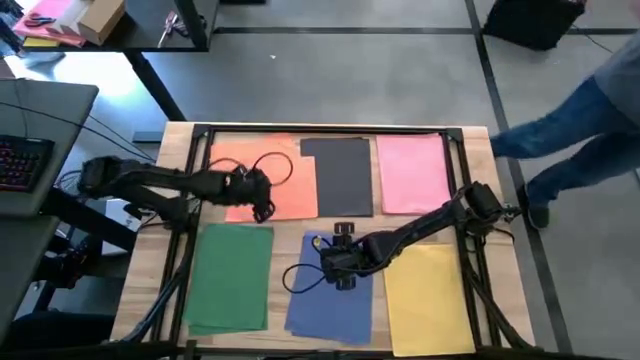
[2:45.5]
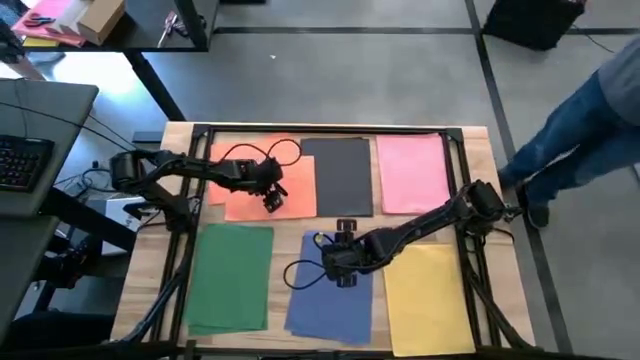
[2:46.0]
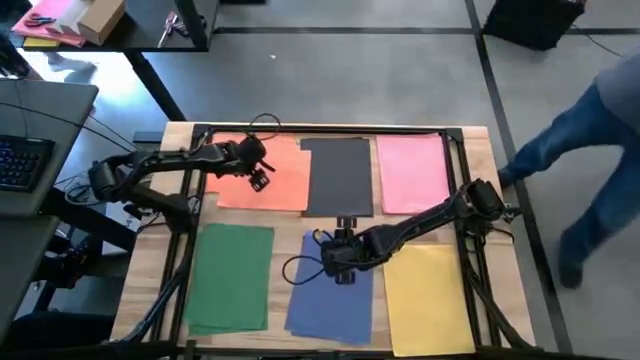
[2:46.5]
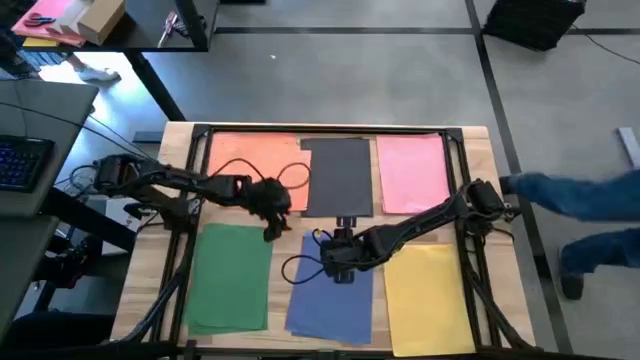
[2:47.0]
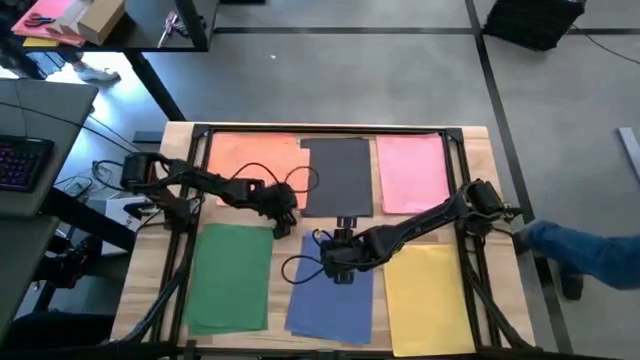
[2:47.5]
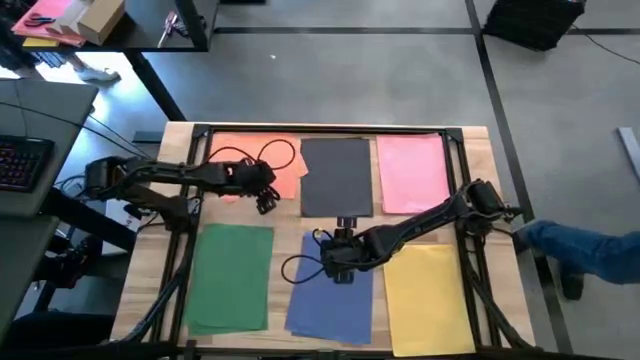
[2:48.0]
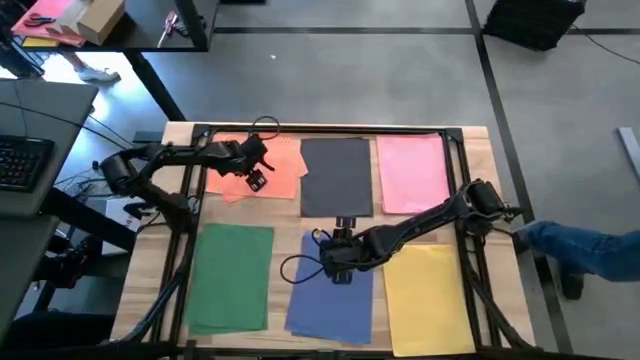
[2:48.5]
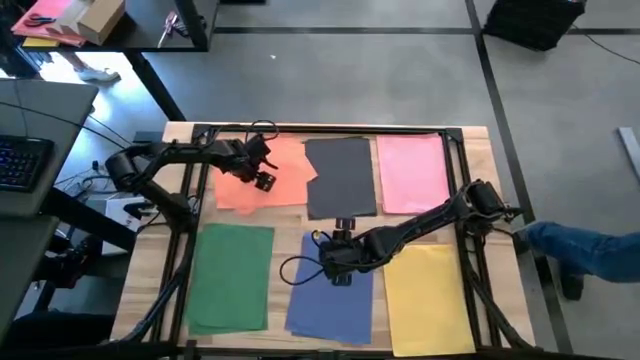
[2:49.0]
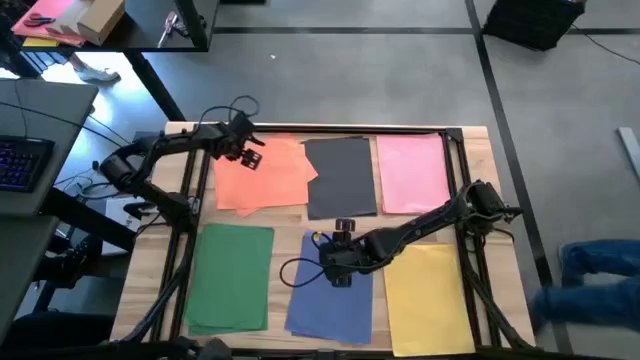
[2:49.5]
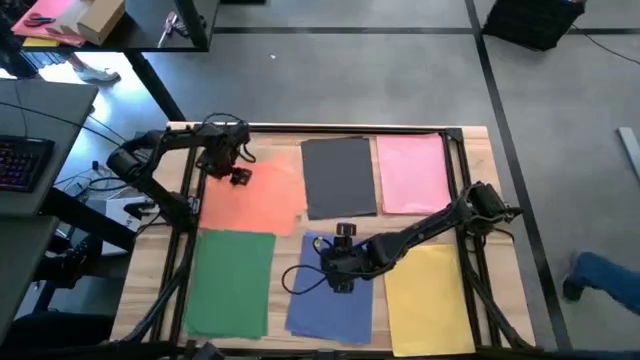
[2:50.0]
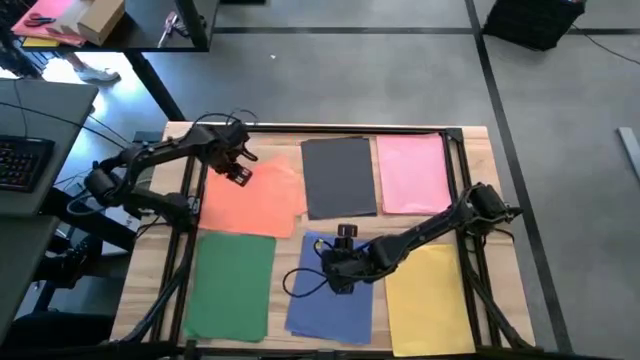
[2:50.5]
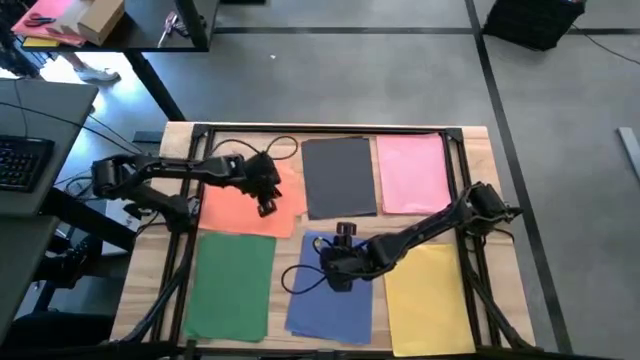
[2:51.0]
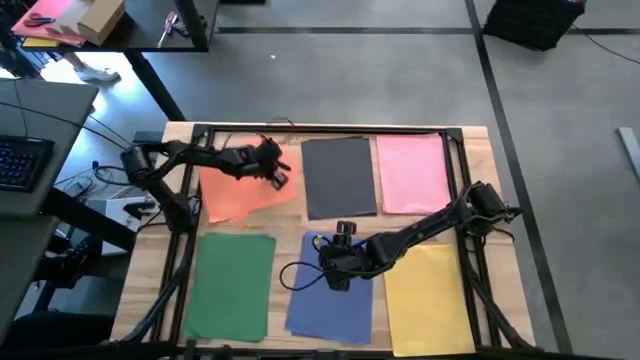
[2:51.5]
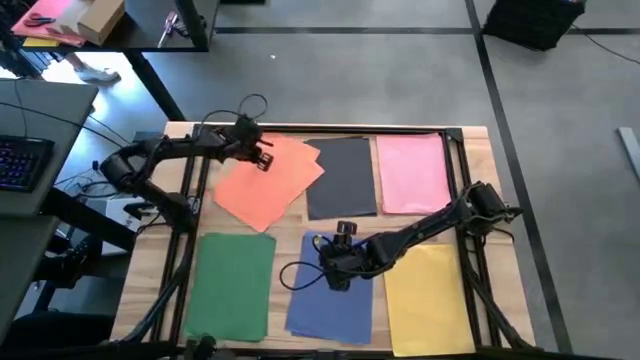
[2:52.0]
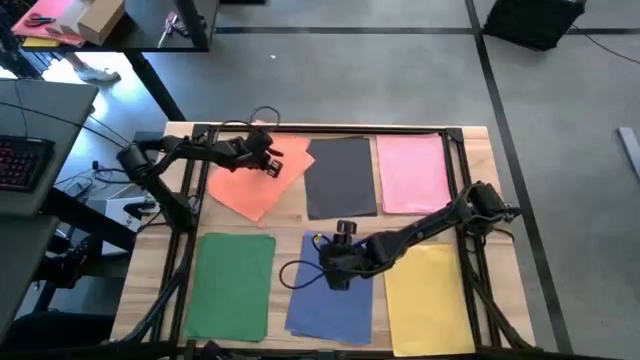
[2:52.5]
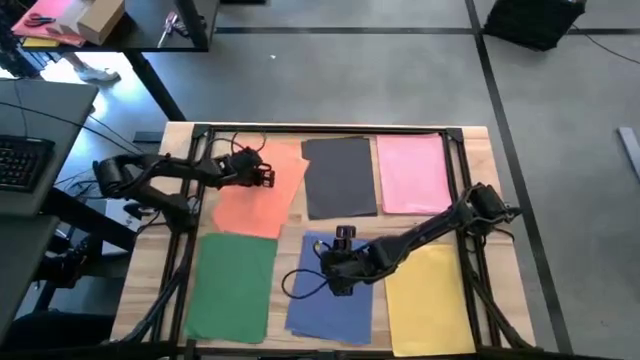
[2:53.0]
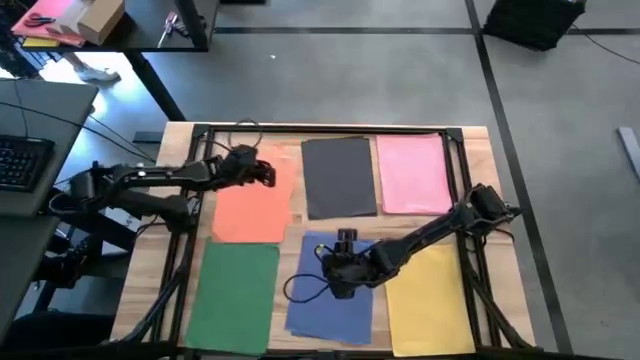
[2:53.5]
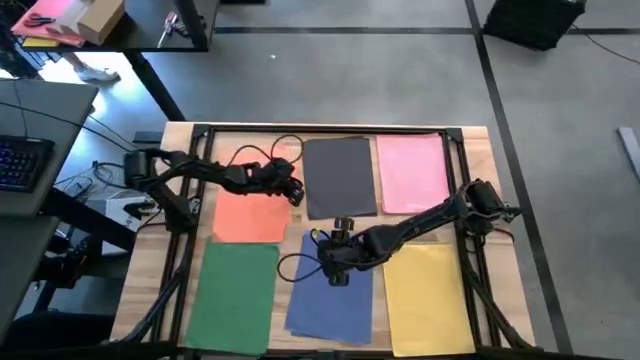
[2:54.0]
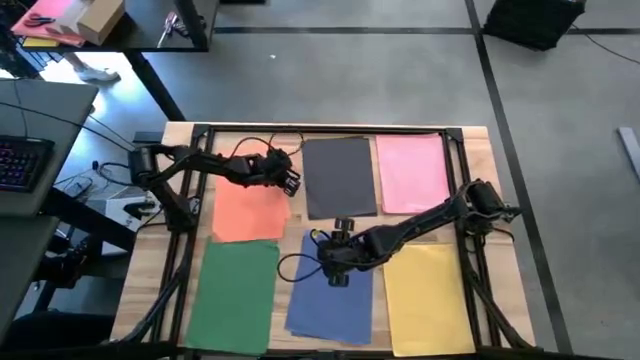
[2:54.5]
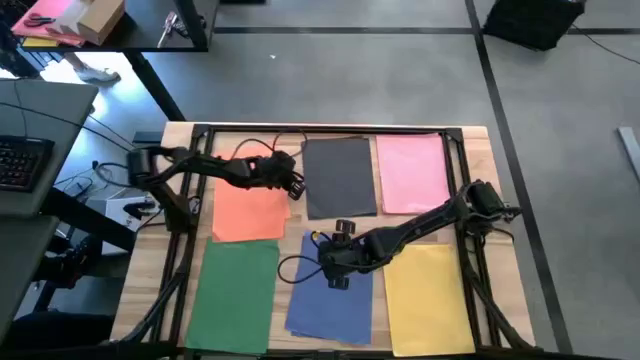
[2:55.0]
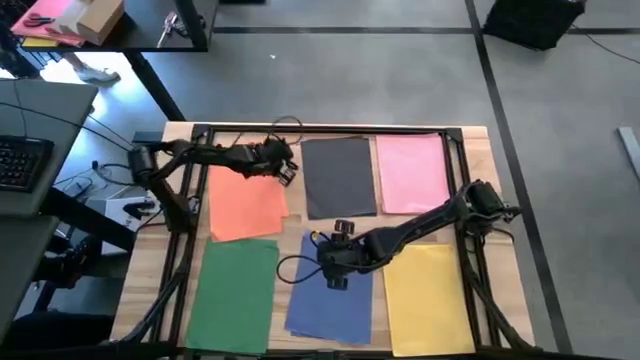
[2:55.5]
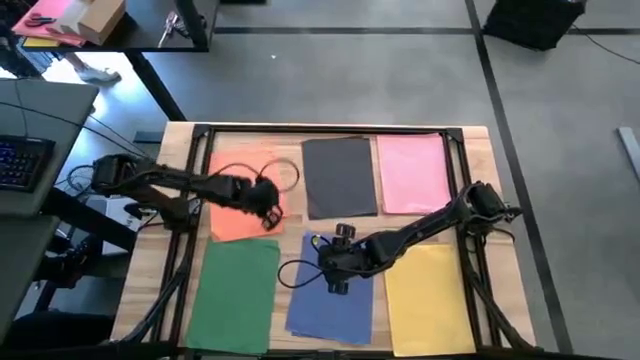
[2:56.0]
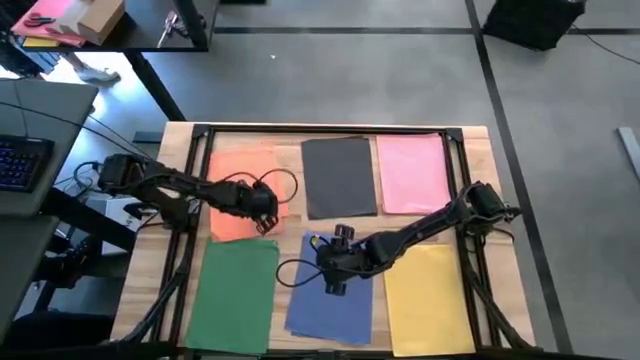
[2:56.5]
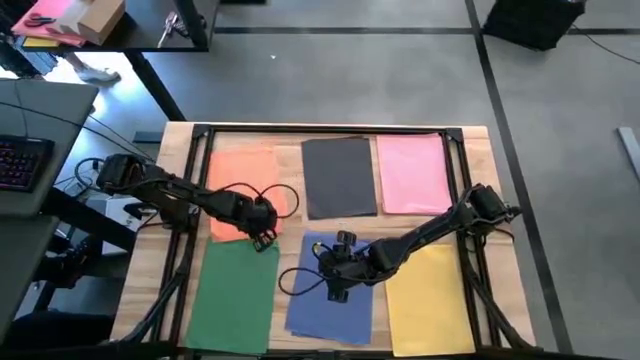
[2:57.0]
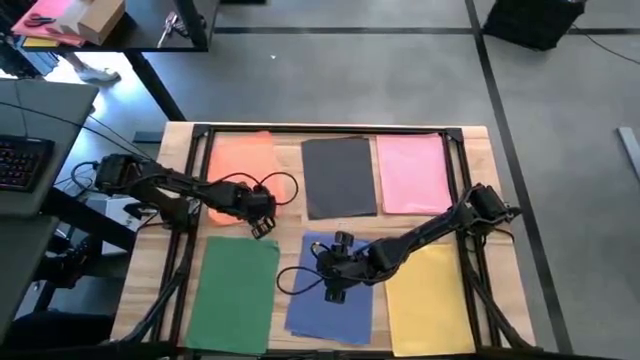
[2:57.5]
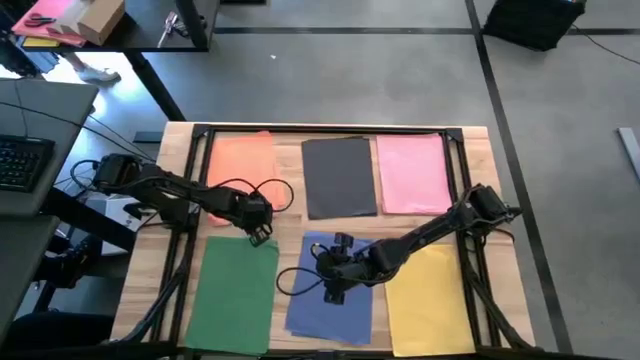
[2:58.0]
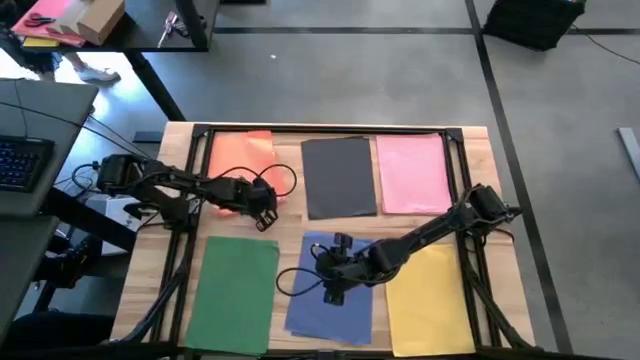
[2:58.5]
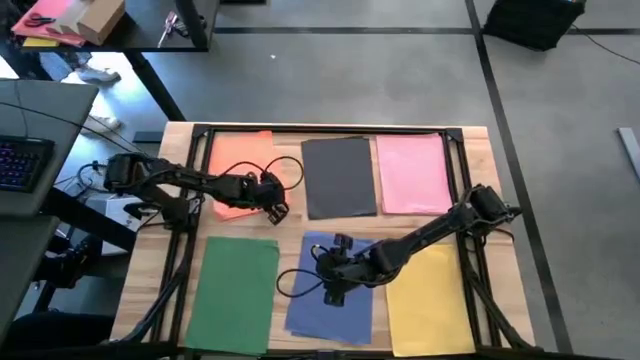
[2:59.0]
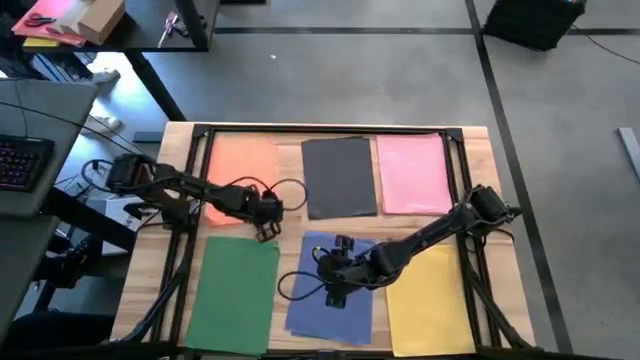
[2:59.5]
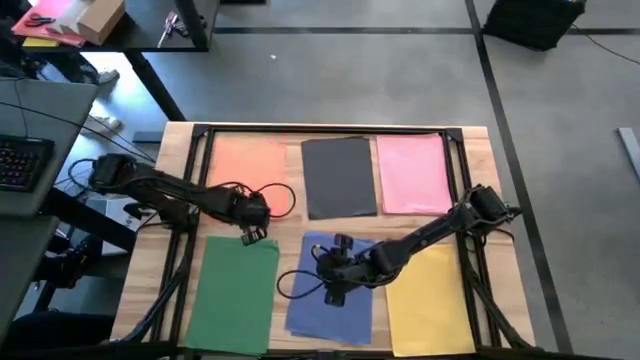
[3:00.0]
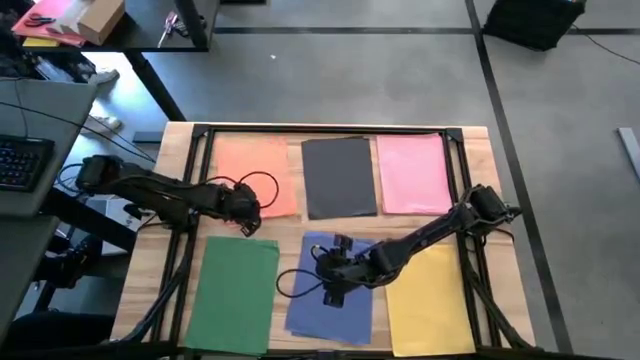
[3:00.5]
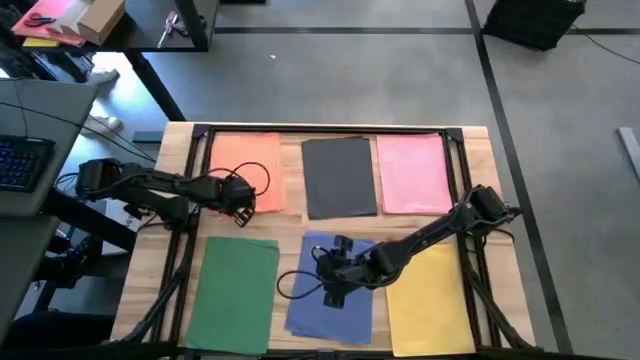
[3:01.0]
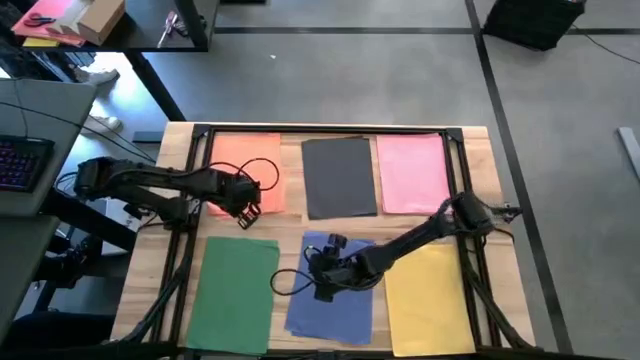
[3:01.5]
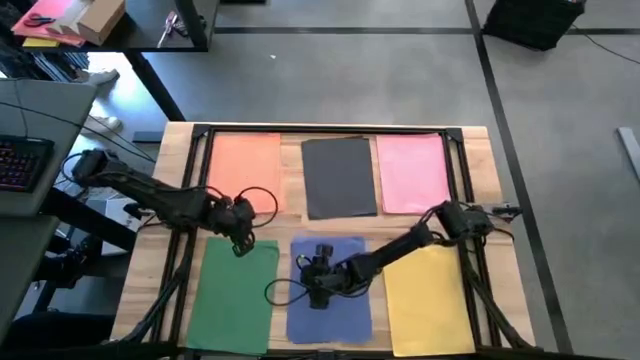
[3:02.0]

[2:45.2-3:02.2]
Task: Organize paper
Adjust the orange papers on the top left of the table

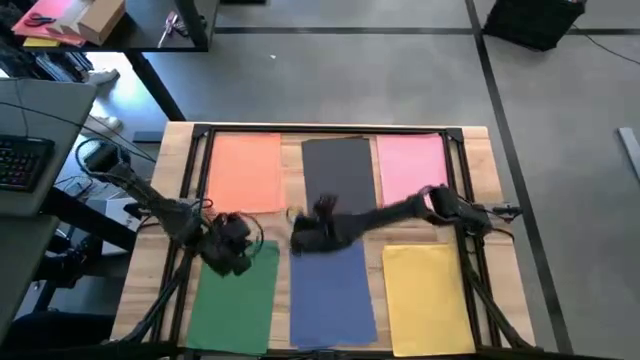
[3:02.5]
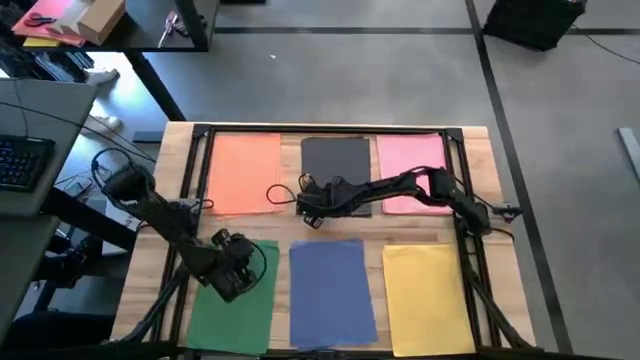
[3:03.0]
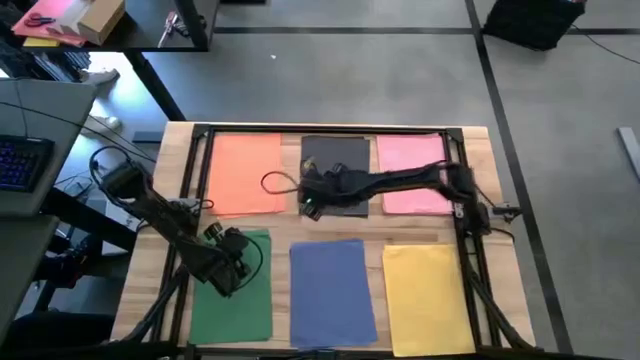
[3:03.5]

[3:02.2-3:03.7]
Adjust the colored papers on the table

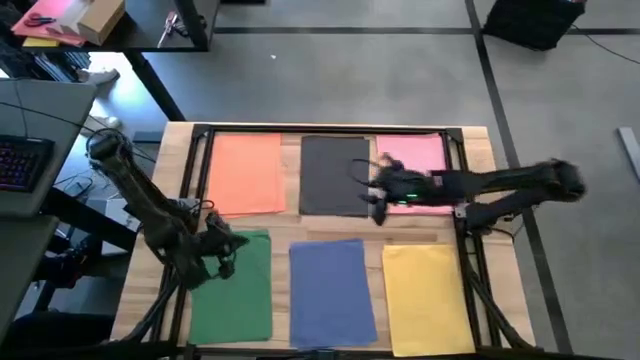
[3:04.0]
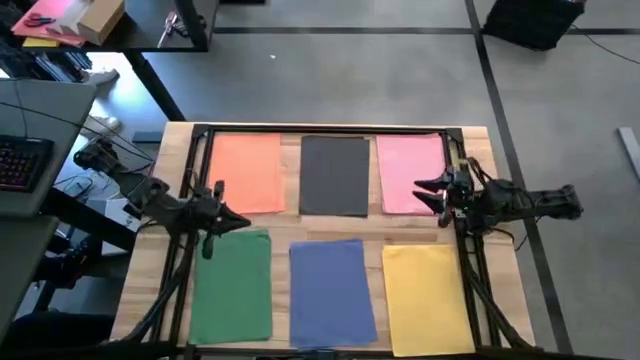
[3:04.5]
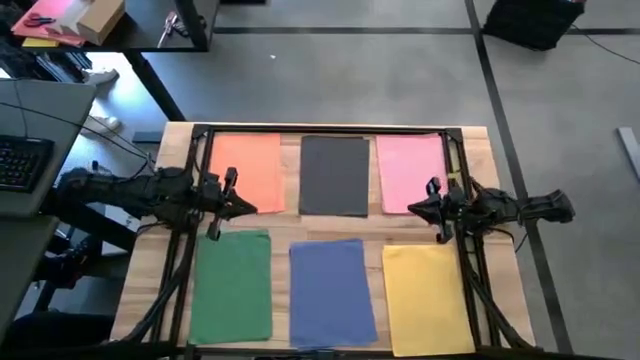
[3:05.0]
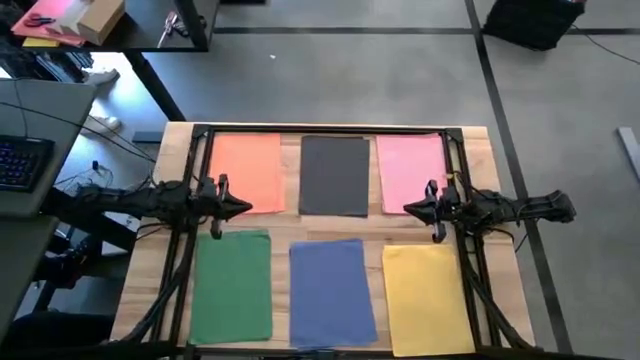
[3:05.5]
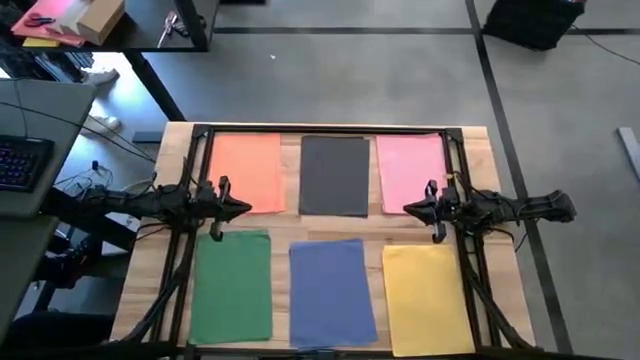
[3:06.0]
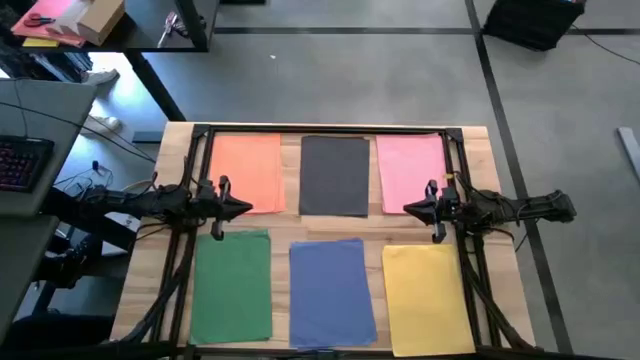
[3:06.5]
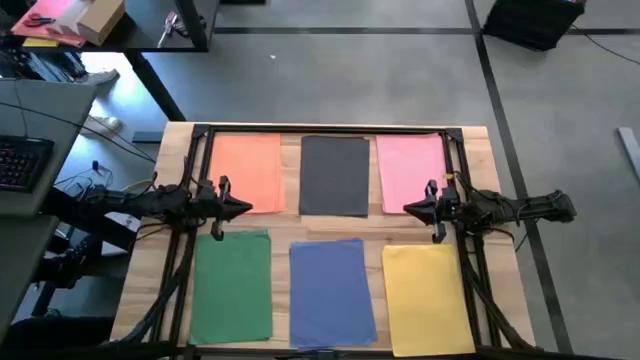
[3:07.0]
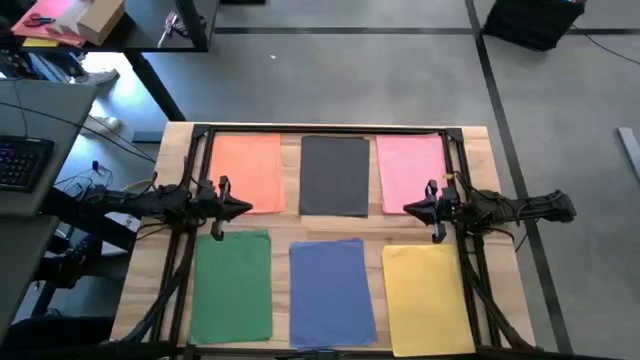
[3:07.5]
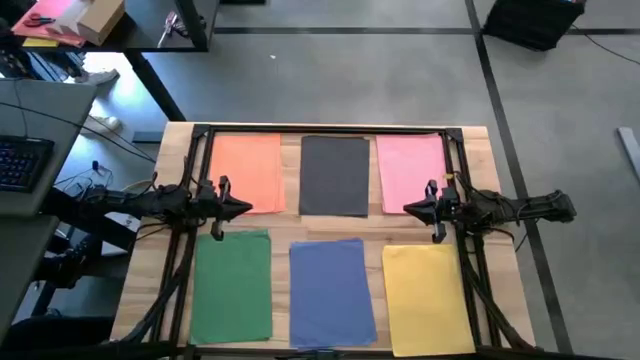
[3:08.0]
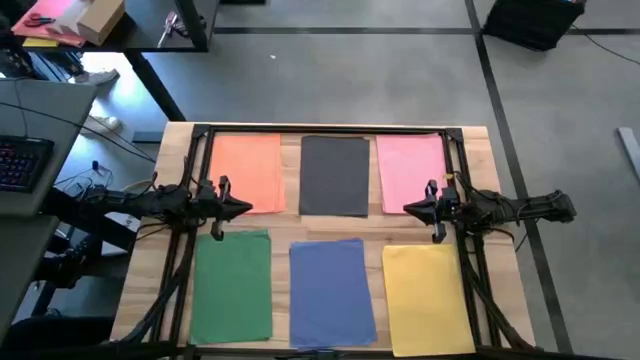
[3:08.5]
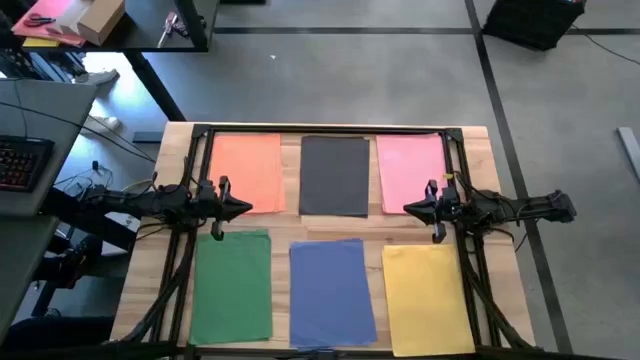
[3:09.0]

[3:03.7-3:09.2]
Return to Home Position
